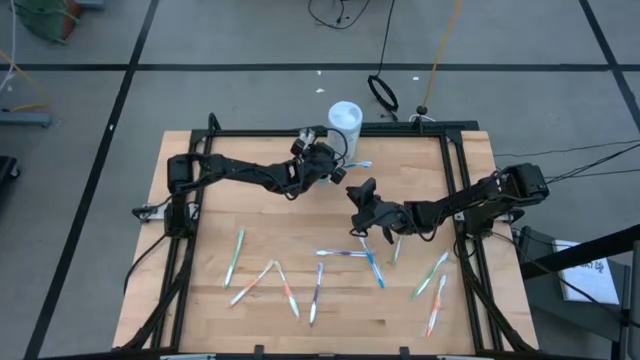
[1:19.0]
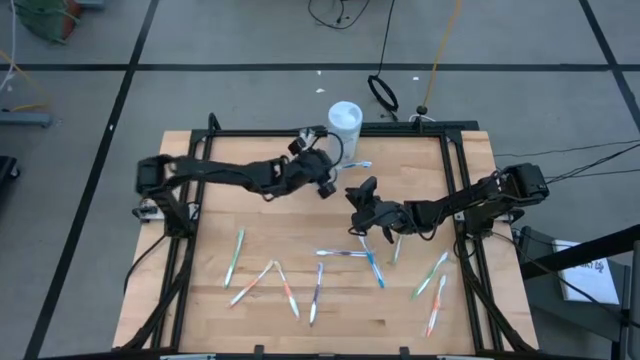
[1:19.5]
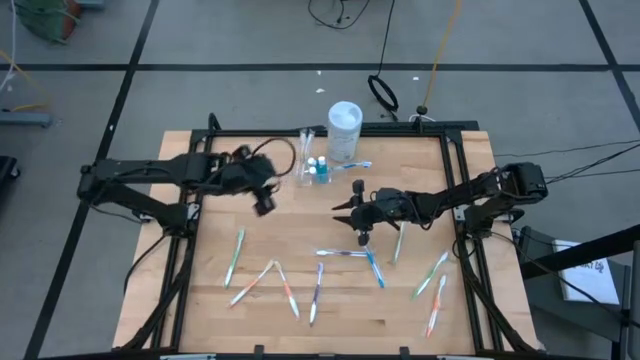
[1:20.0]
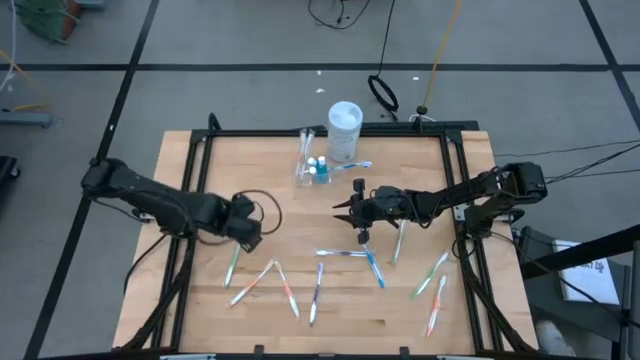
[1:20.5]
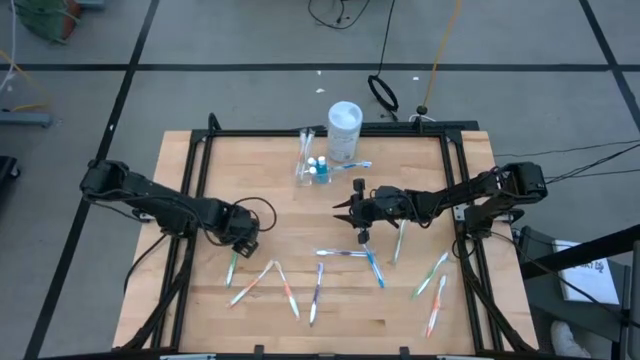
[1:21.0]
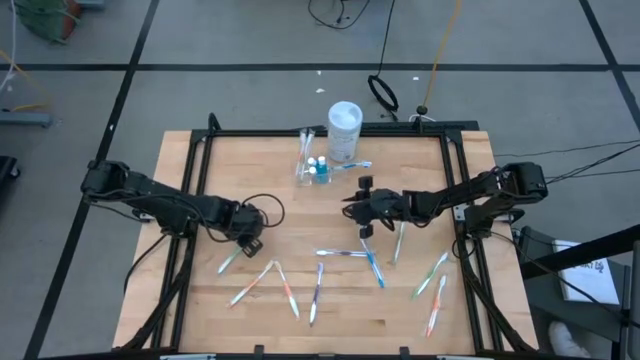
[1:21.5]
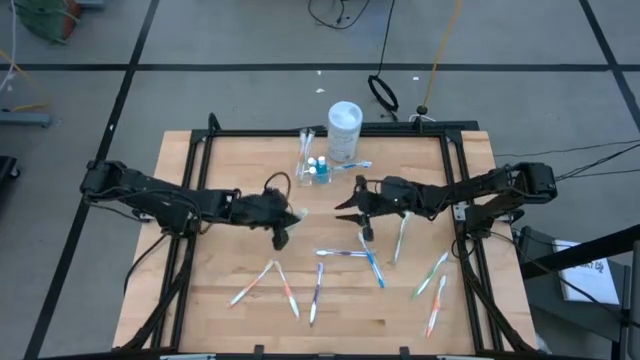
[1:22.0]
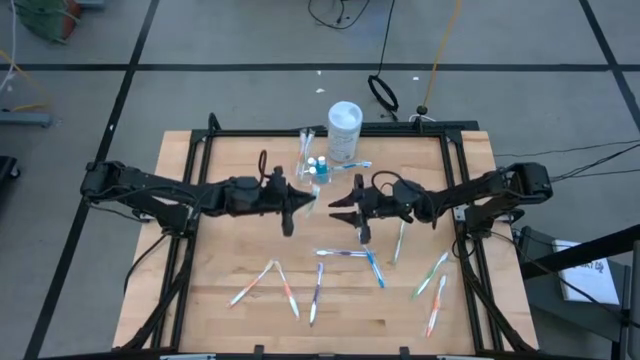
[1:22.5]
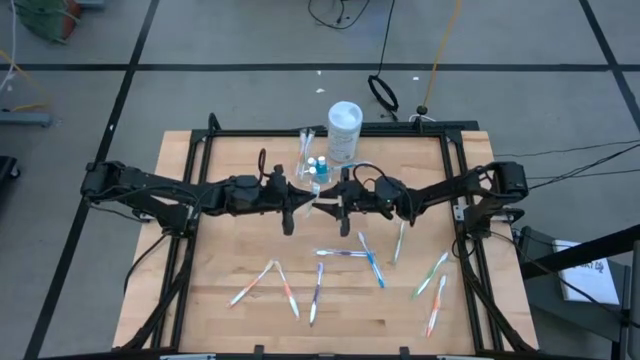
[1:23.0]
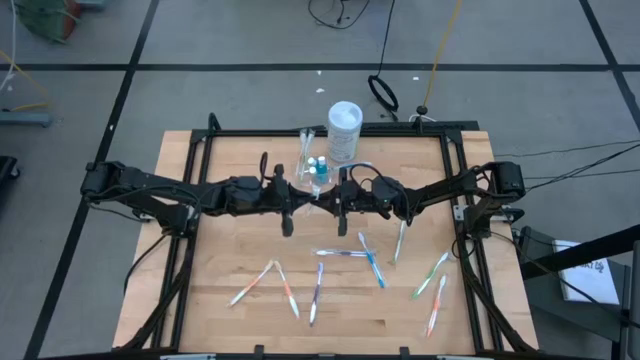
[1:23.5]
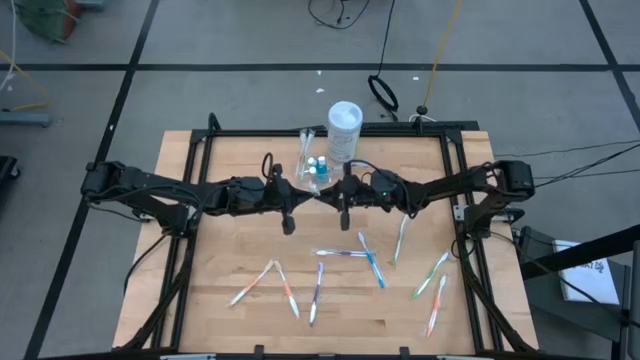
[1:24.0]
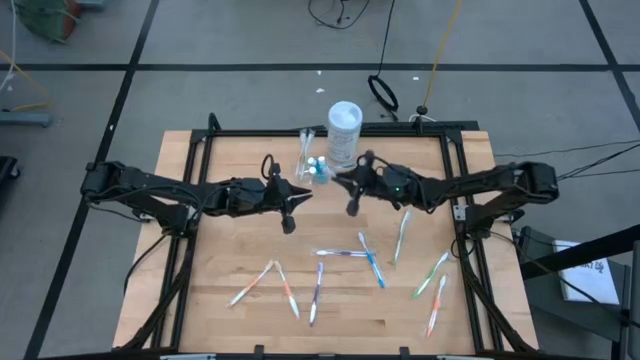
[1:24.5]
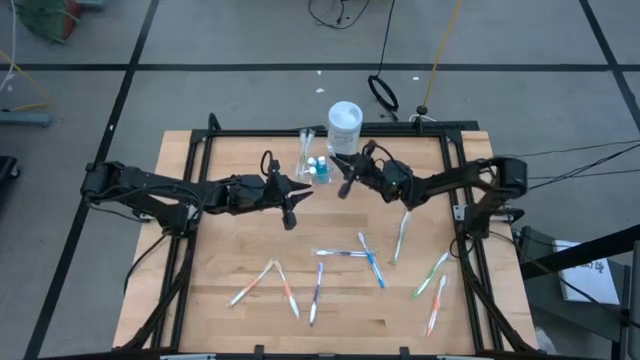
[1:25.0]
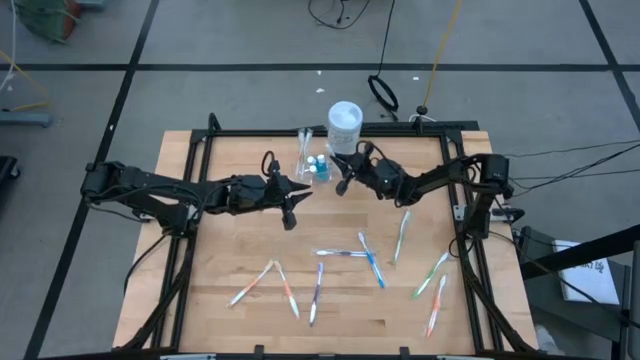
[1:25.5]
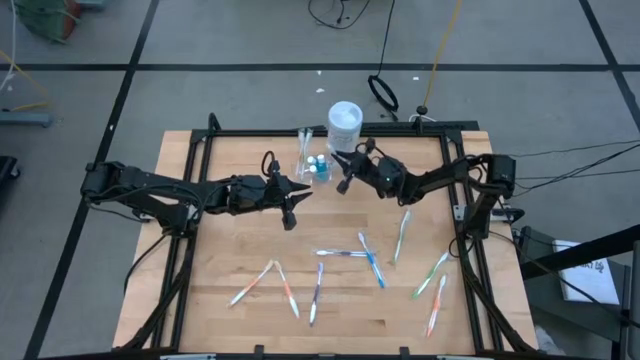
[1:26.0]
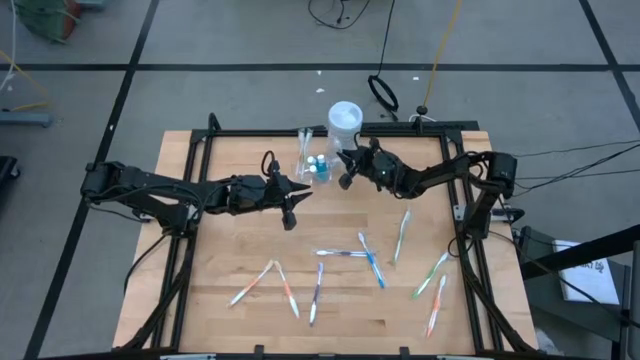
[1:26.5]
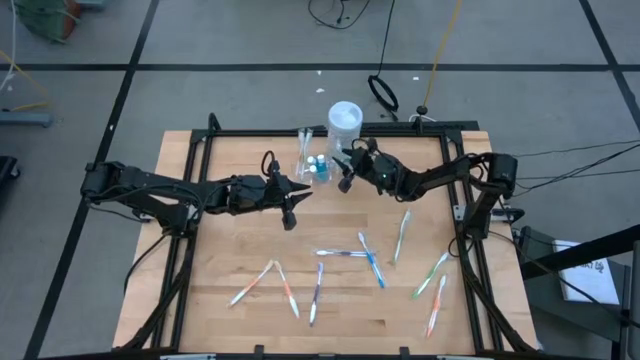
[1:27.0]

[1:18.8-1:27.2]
Task: Pick & Place toothbrushing station
Put the green toothbrush into the transparent organizer

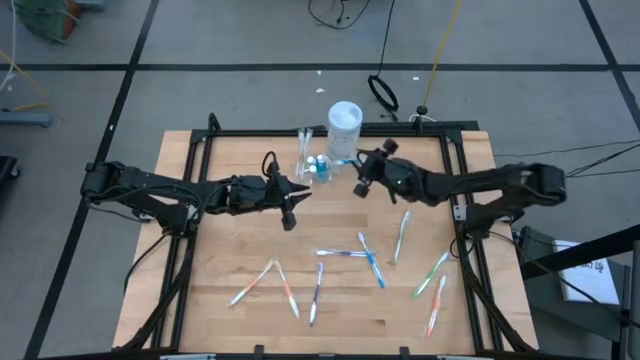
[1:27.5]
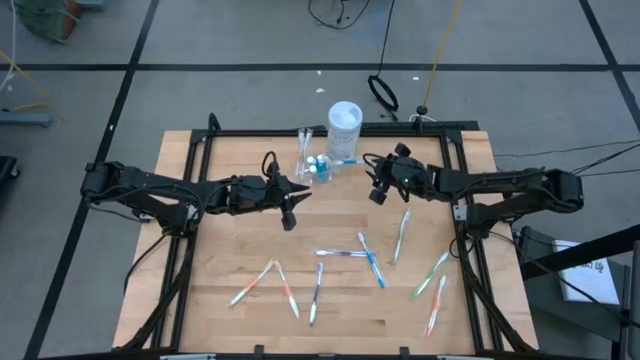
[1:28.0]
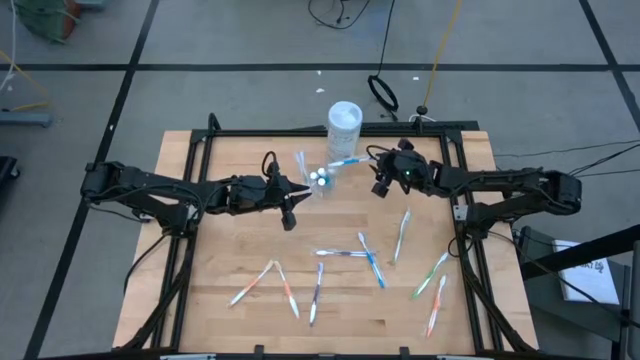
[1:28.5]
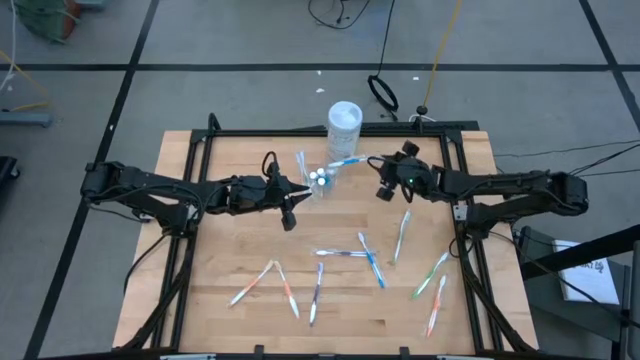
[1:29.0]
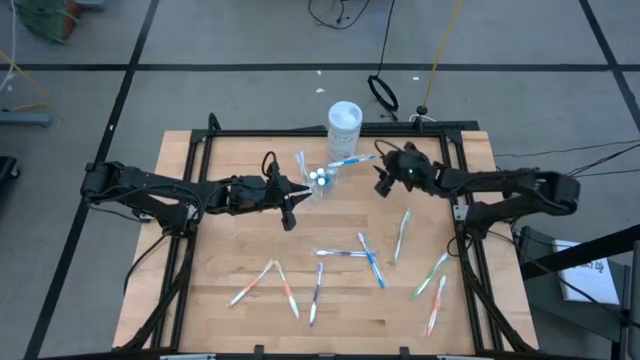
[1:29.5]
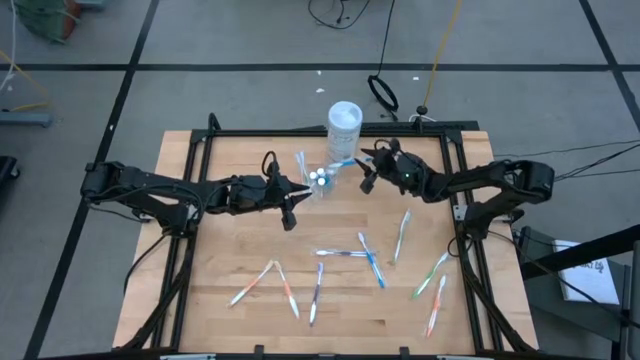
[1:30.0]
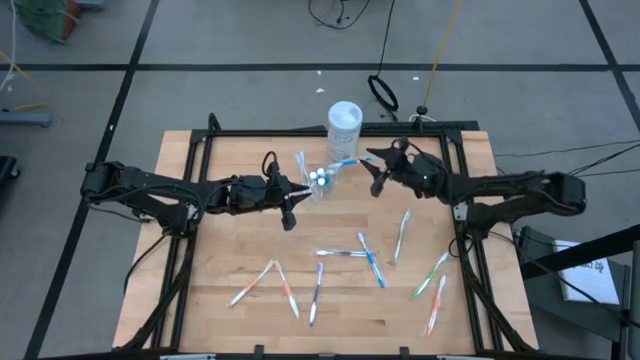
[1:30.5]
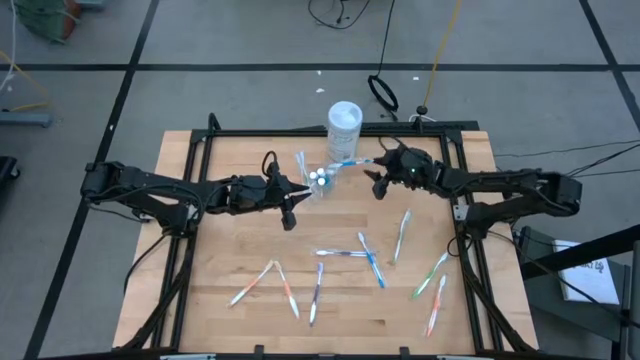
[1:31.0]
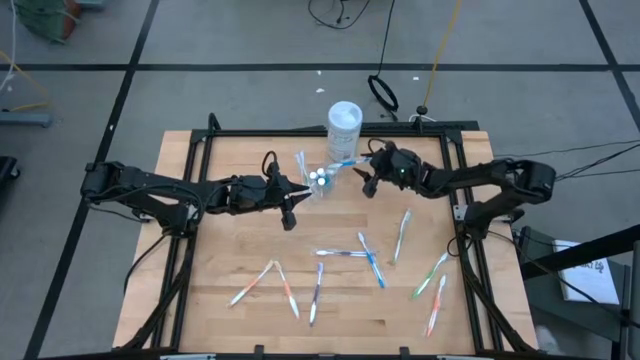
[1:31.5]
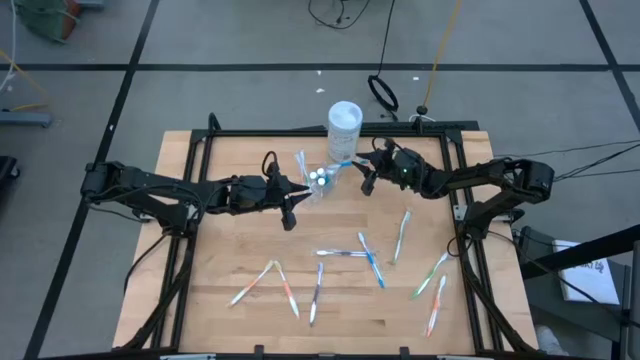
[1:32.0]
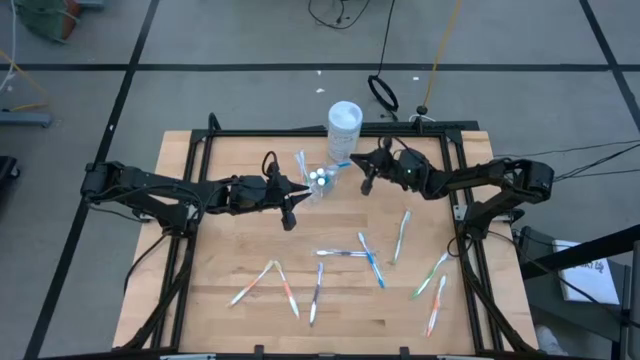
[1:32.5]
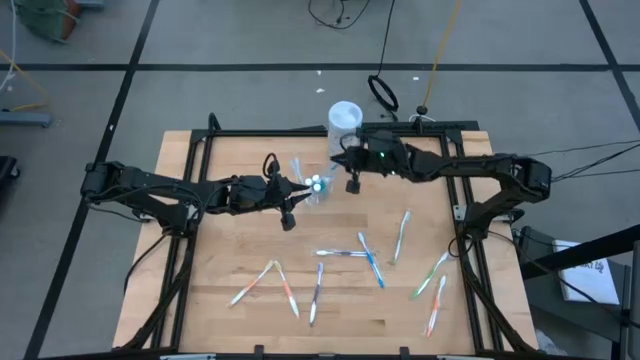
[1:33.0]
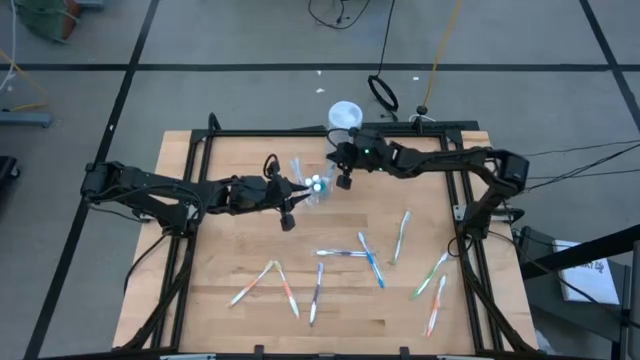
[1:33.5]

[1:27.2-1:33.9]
Adjust the blue toothbrush in the transparent organizer

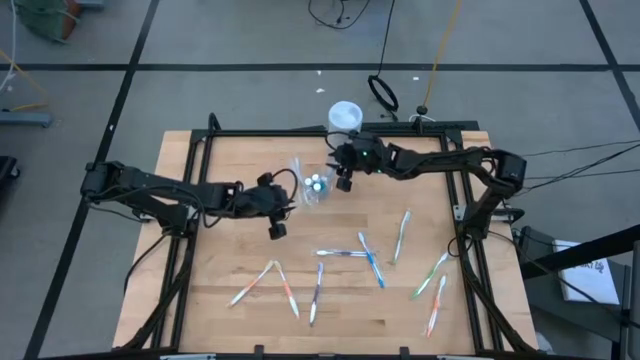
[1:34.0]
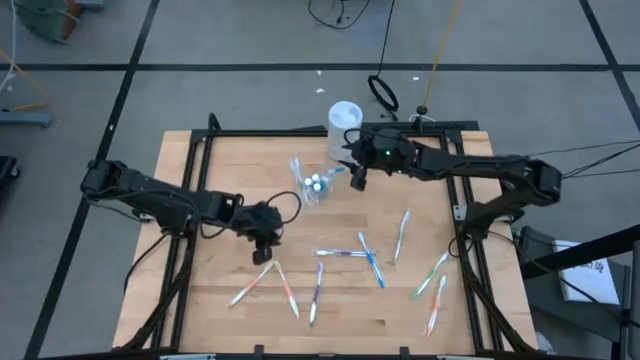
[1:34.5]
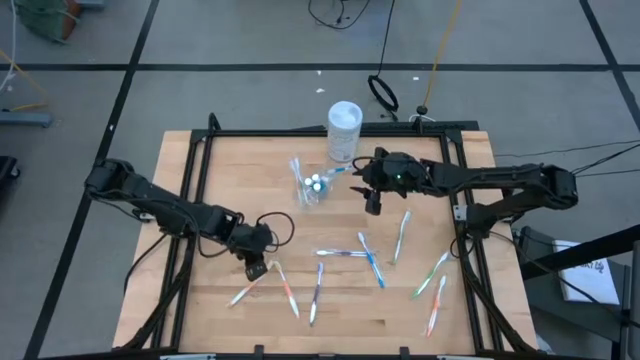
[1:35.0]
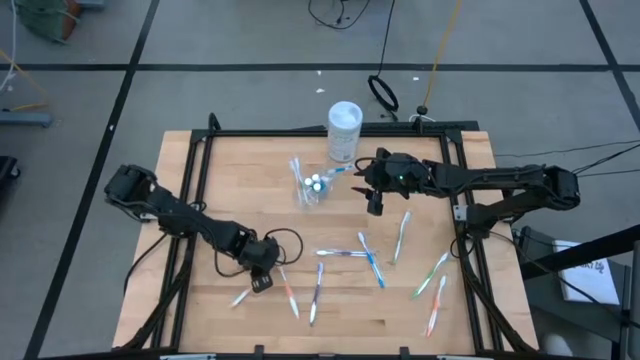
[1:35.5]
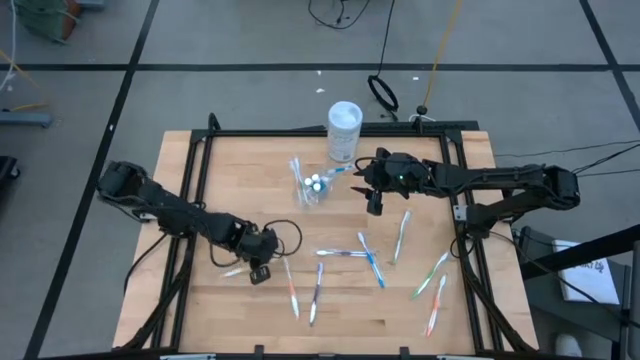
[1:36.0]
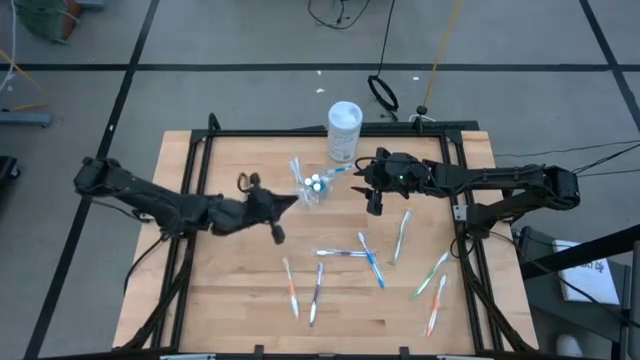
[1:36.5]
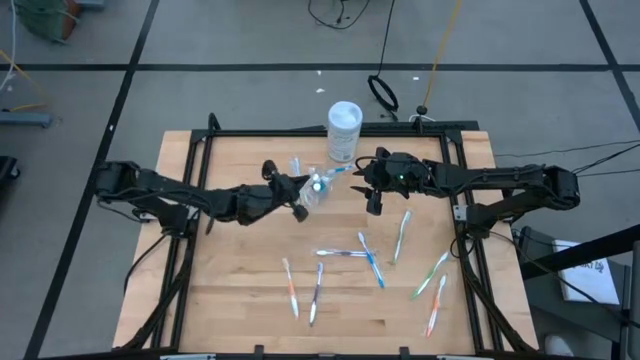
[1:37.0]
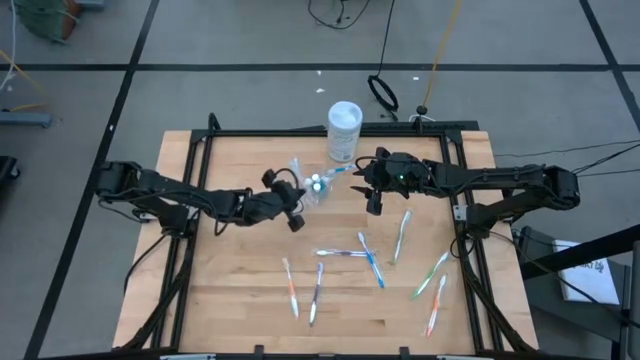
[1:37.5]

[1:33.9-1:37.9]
Put the orange toothbrush into the transparent organizer

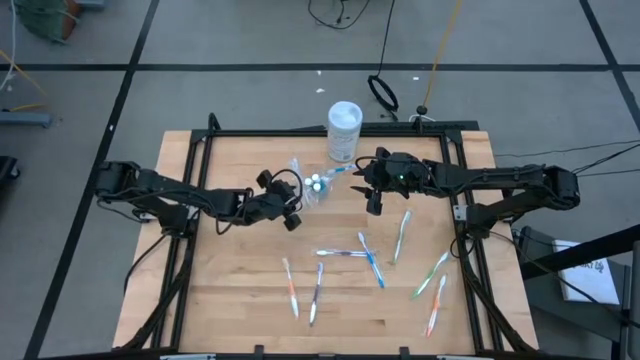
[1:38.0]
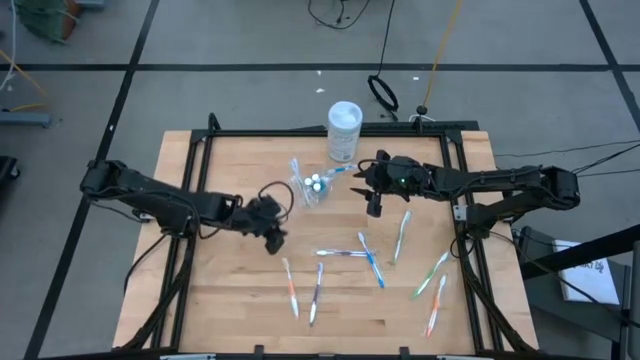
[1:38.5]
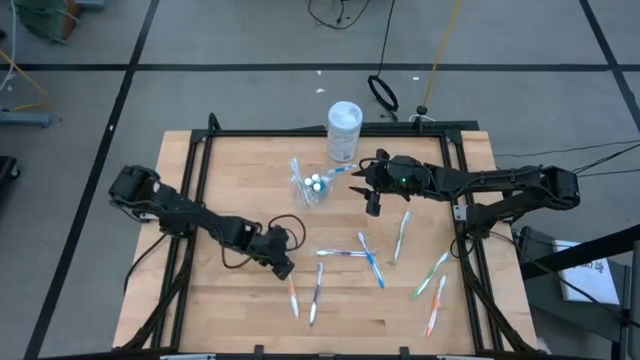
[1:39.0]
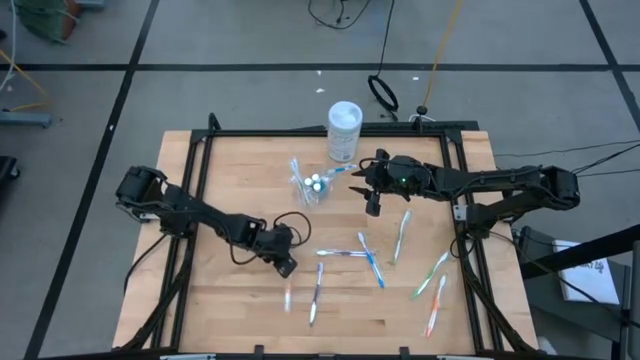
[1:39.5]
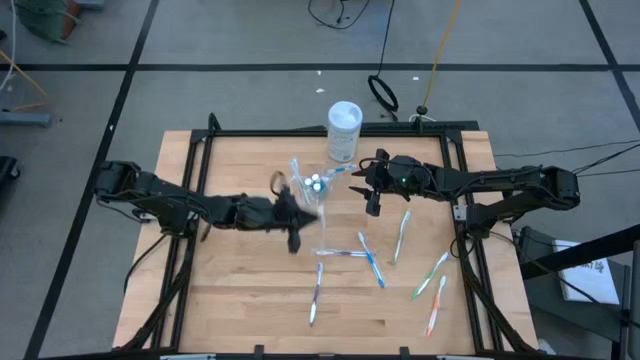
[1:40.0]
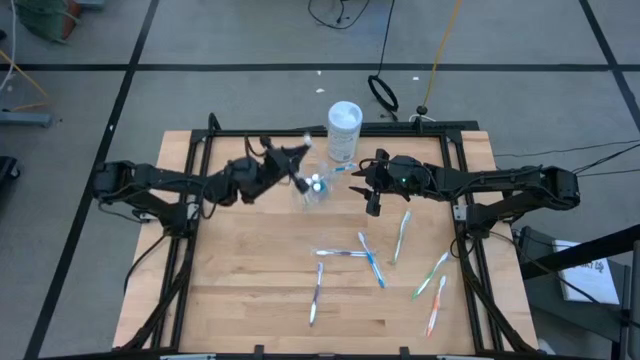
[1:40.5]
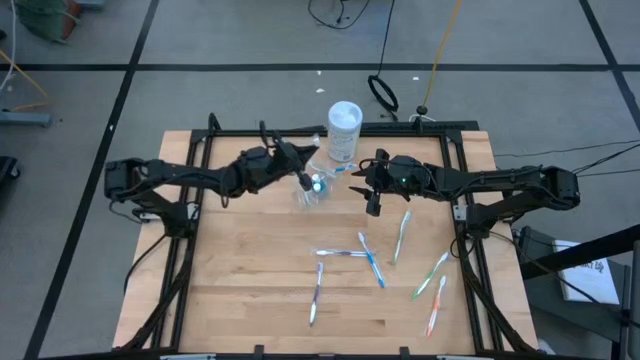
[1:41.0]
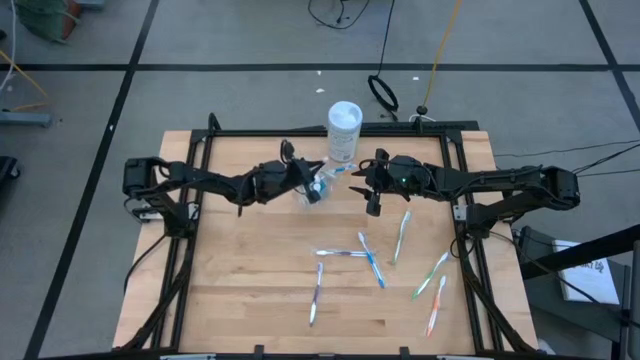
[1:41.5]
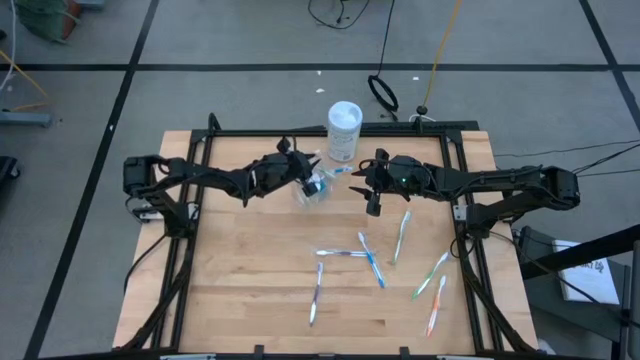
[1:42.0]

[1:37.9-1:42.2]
Put the orange toothbrush into the transparent organizer
